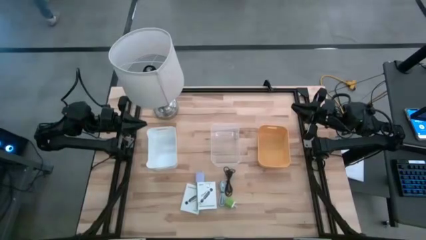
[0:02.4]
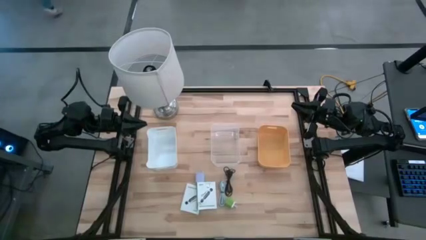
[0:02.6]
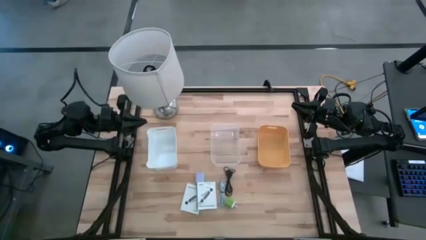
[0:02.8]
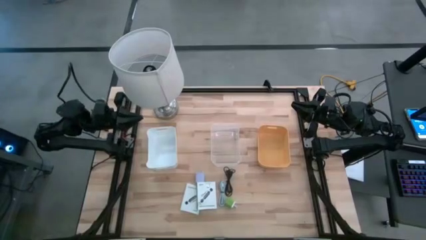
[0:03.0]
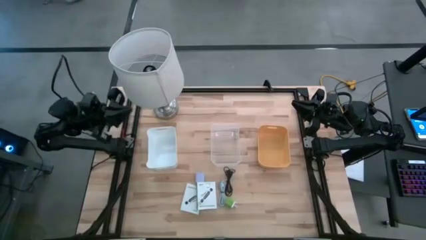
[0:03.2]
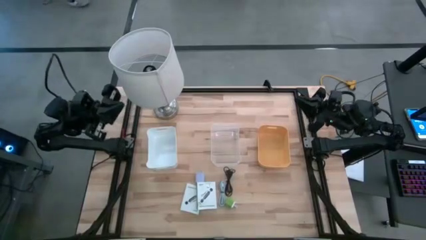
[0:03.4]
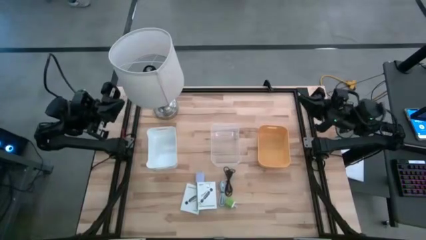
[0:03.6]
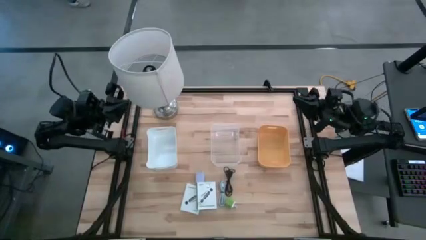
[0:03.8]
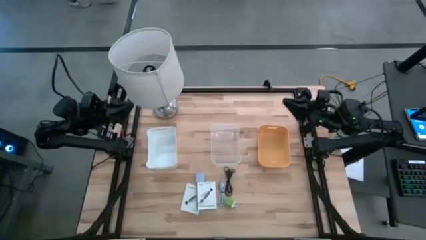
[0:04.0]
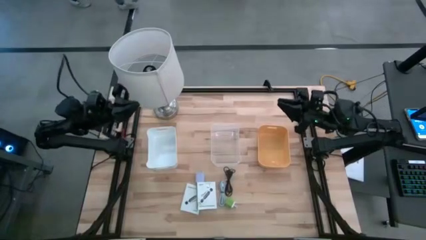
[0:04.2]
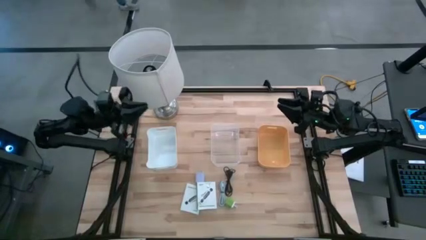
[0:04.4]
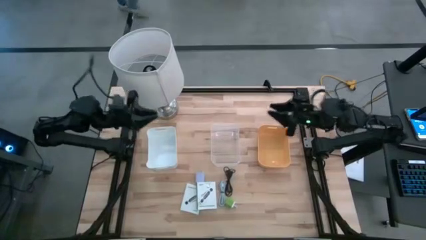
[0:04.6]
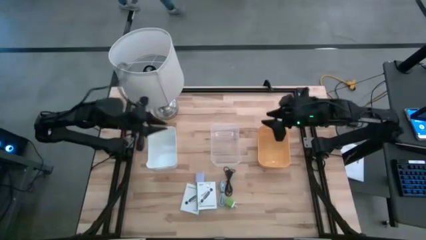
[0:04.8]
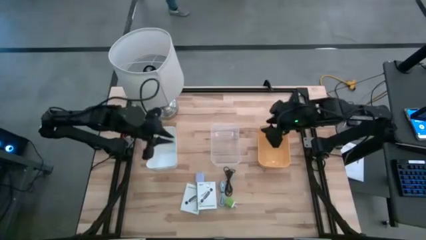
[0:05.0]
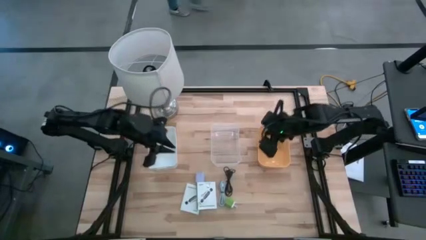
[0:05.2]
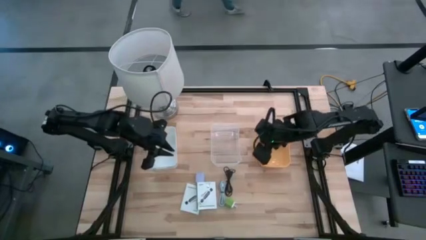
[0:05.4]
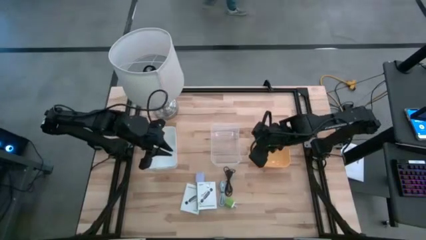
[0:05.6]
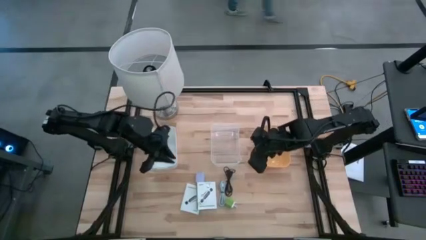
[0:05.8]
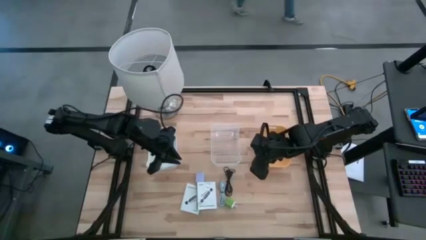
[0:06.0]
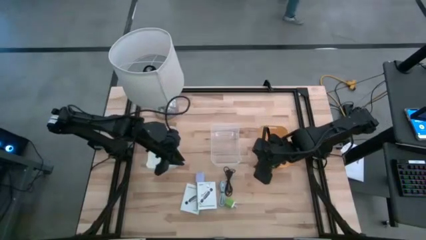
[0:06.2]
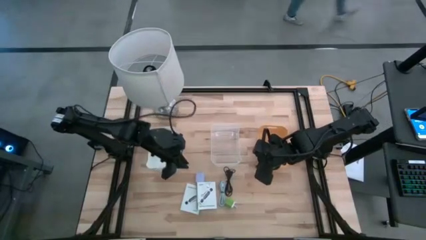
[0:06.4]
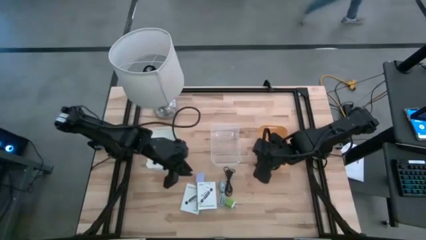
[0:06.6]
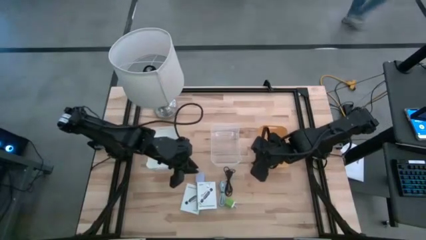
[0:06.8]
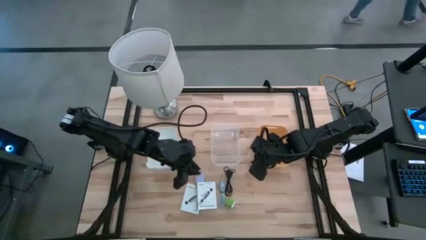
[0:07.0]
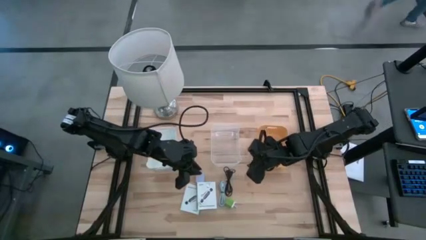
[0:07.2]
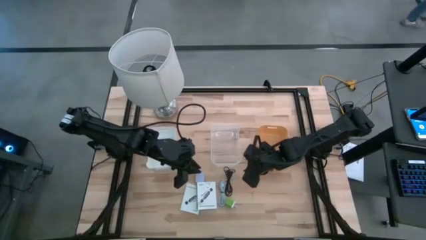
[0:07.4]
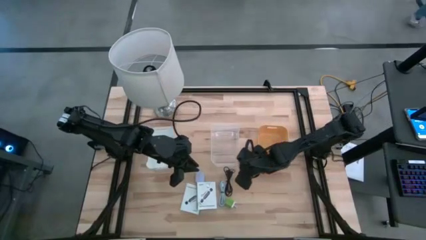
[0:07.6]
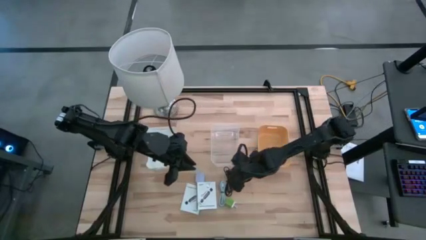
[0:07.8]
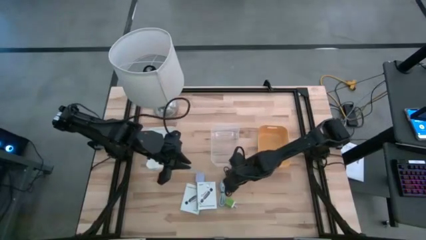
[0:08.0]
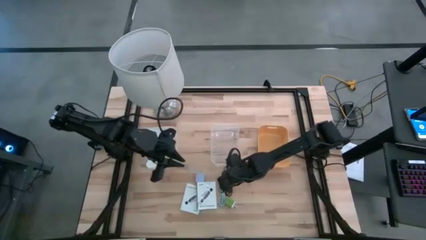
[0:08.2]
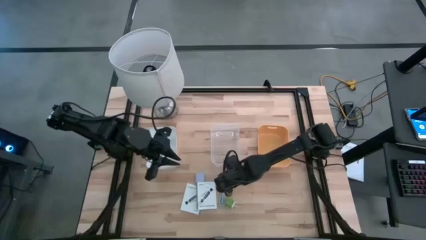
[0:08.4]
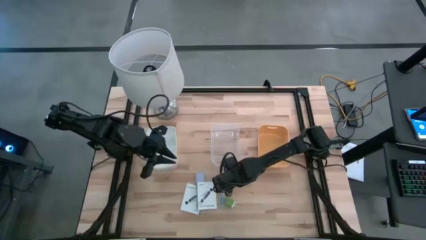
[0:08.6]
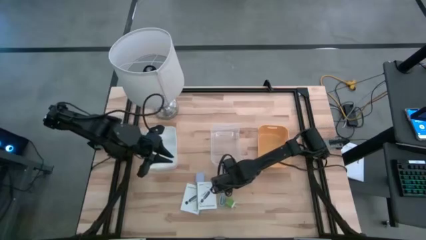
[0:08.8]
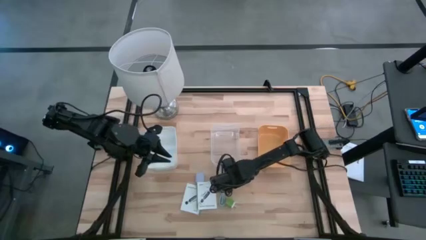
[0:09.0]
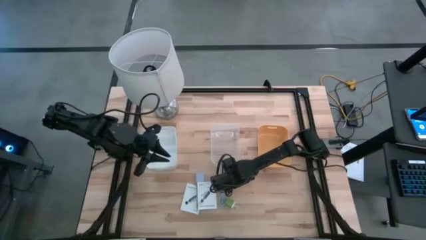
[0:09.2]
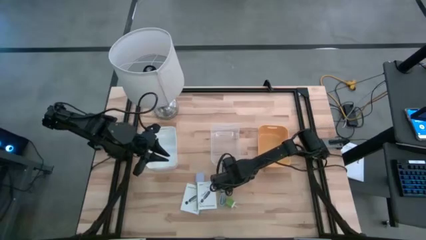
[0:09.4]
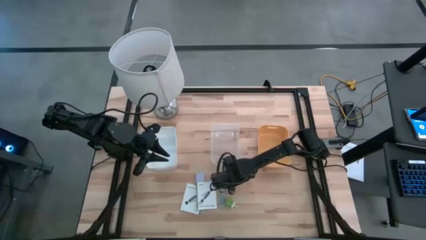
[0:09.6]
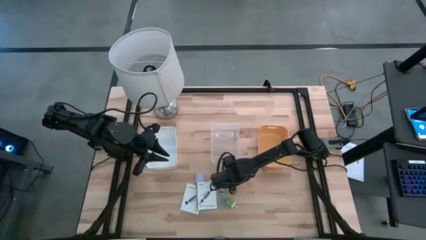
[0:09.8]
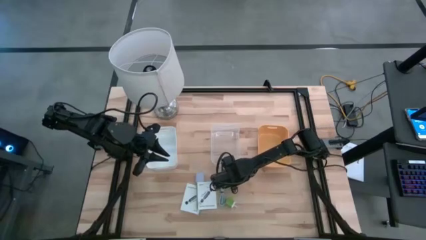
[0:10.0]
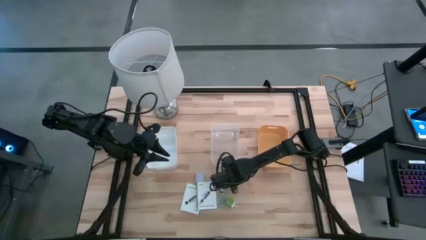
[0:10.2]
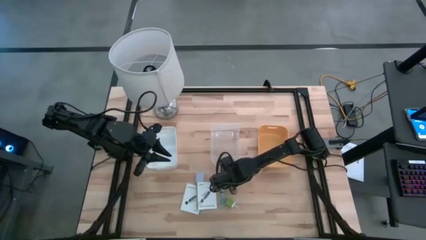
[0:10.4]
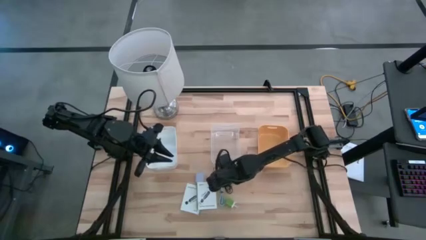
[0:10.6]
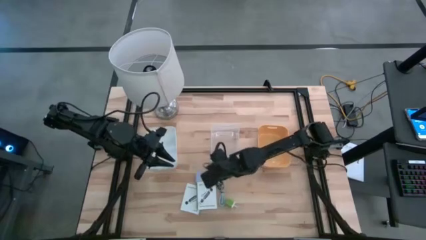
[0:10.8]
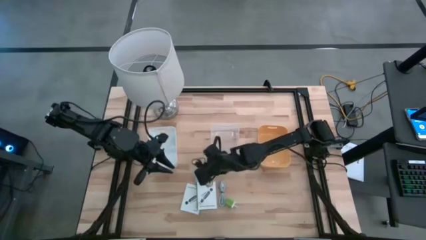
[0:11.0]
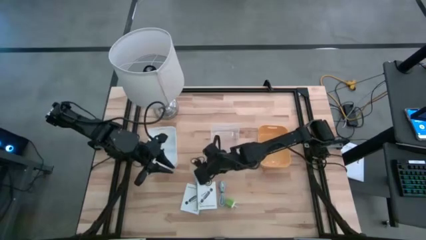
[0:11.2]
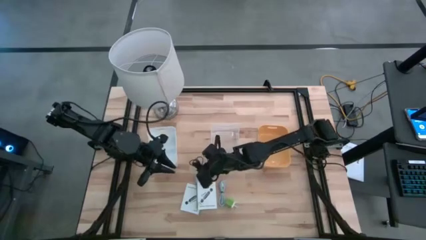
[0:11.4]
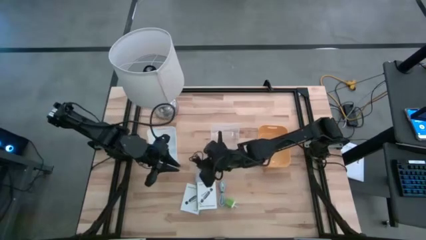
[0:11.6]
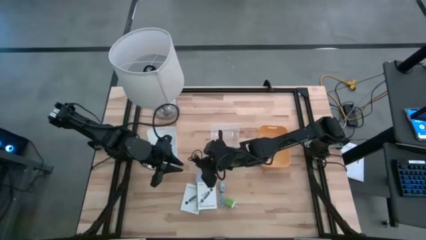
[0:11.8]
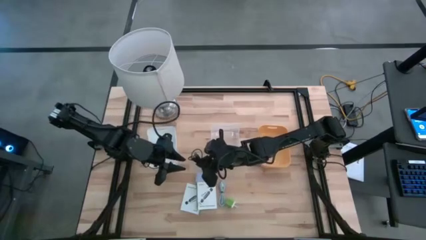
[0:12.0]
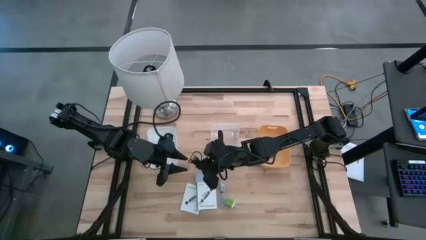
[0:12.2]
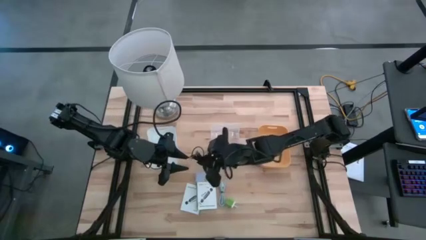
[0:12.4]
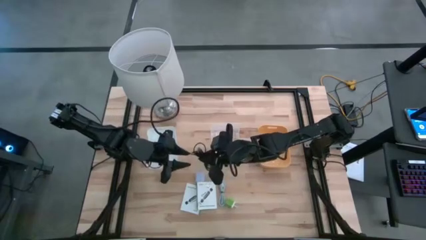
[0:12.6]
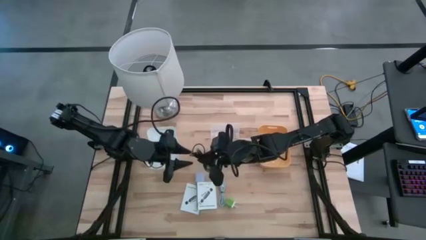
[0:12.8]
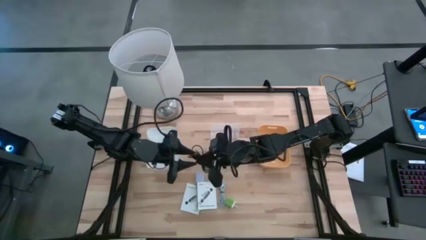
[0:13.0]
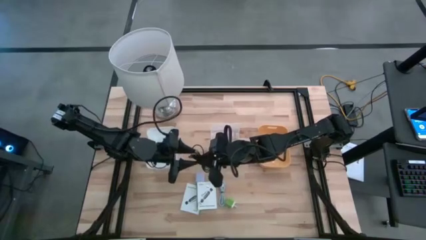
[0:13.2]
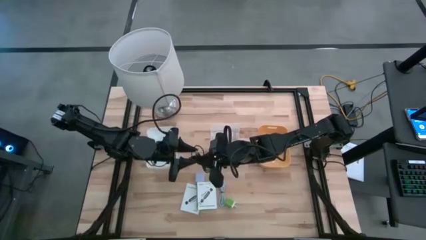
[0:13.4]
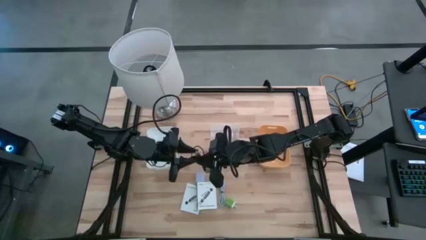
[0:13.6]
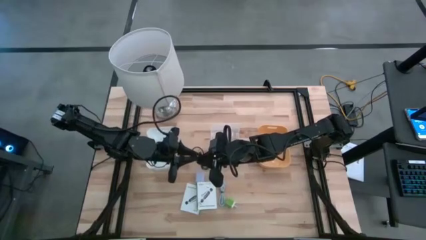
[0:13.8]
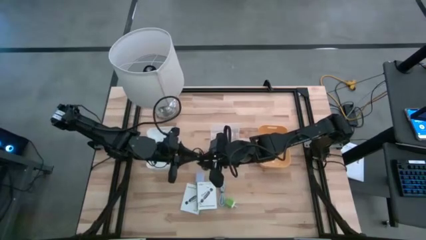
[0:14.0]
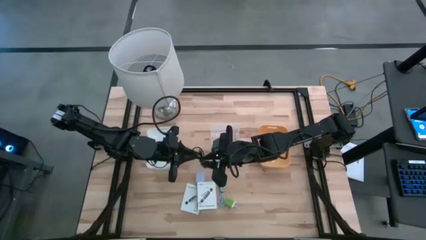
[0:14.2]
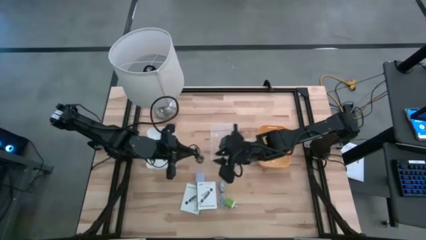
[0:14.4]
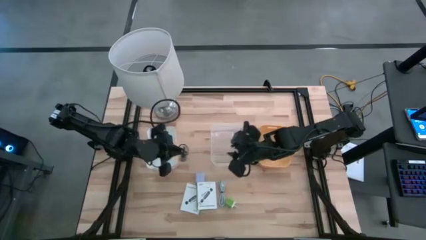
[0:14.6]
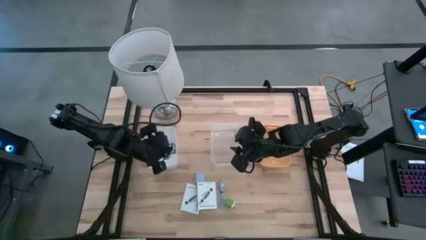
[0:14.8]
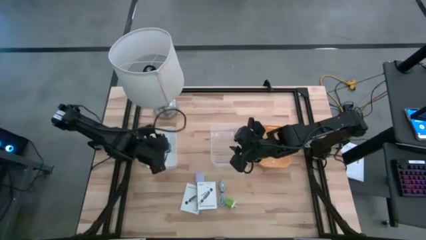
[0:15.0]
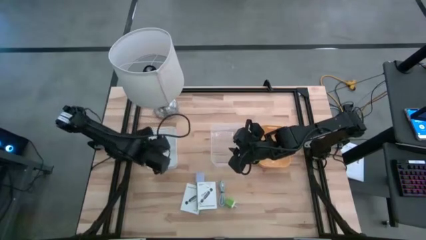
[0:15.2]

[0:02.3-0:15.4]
Task: Pick and place items into bin
Put the black charger cable into the white bin
